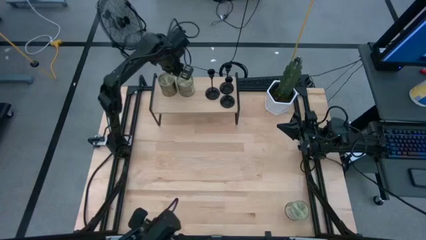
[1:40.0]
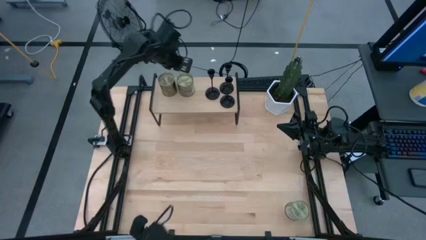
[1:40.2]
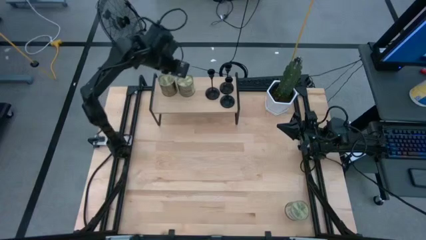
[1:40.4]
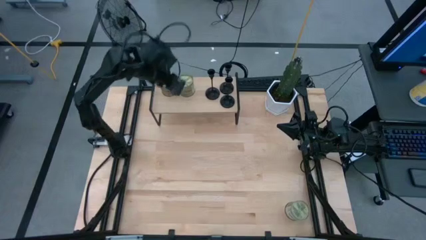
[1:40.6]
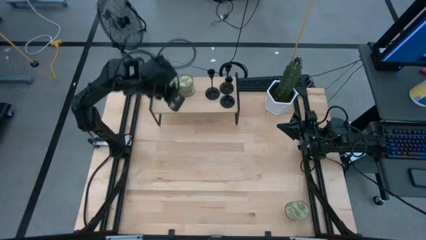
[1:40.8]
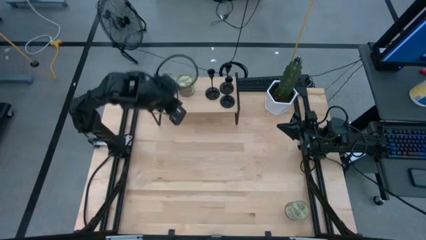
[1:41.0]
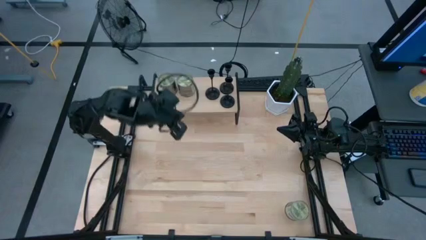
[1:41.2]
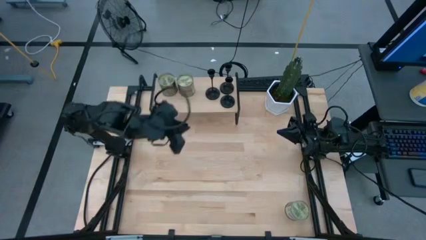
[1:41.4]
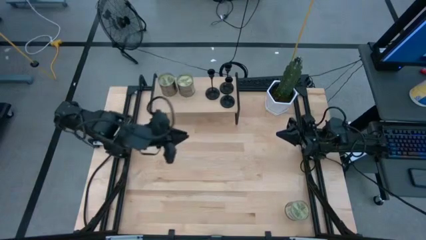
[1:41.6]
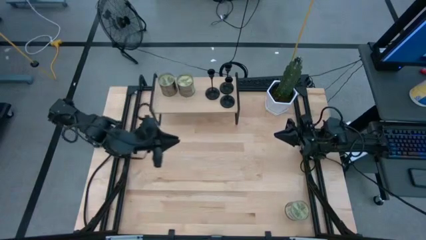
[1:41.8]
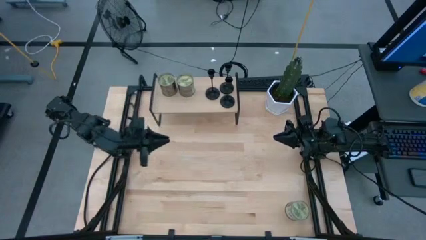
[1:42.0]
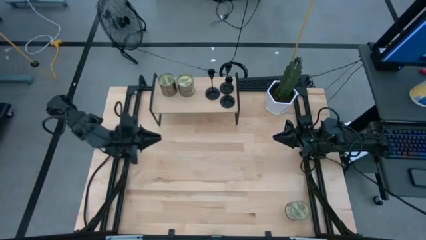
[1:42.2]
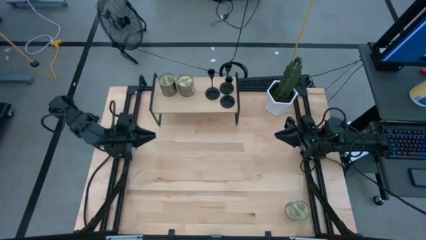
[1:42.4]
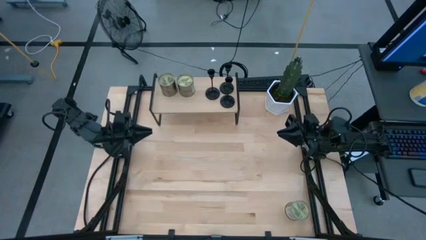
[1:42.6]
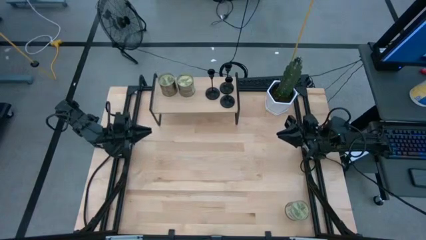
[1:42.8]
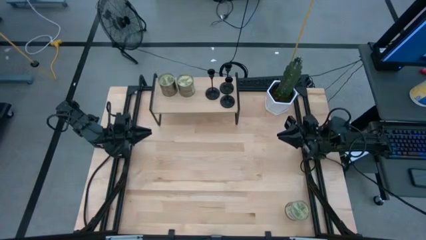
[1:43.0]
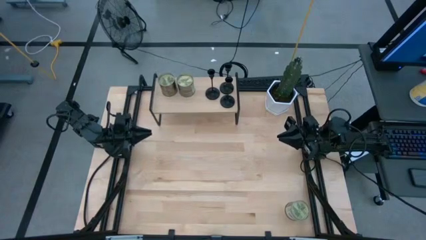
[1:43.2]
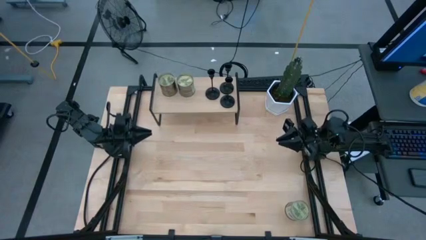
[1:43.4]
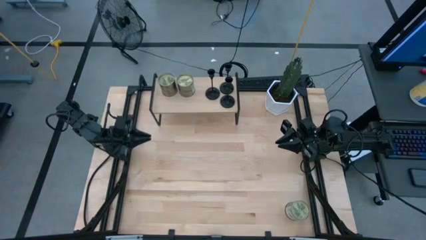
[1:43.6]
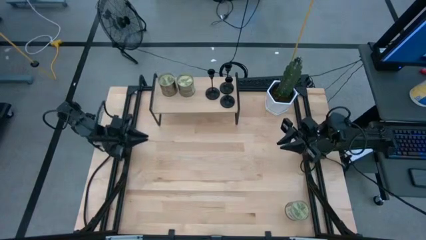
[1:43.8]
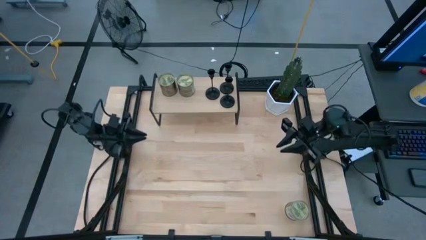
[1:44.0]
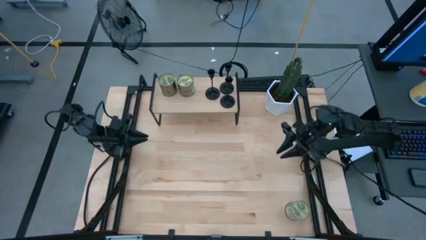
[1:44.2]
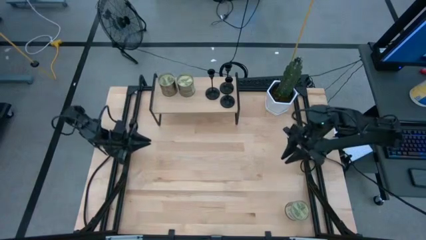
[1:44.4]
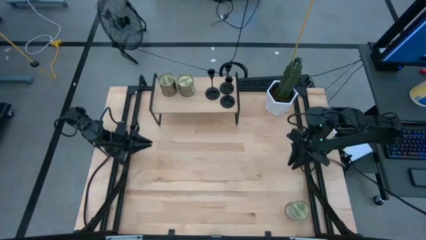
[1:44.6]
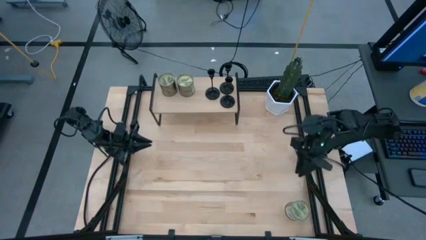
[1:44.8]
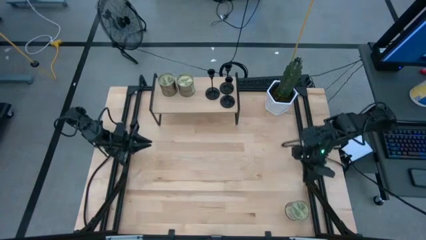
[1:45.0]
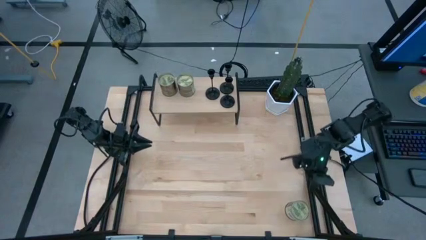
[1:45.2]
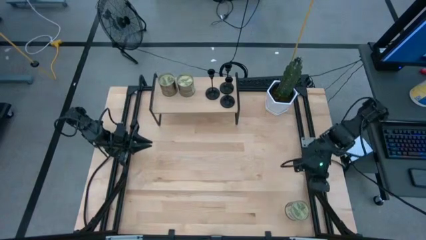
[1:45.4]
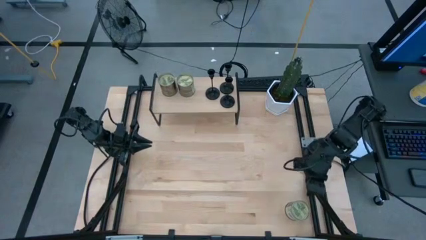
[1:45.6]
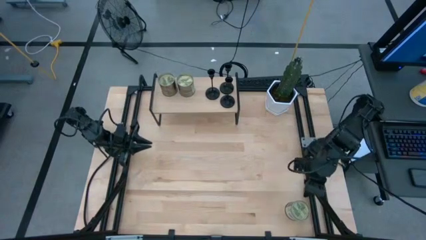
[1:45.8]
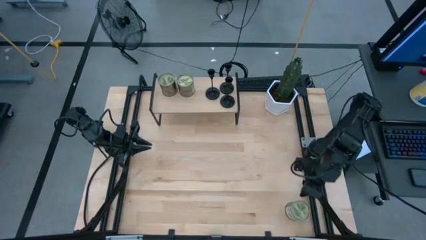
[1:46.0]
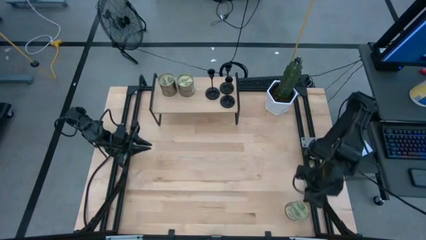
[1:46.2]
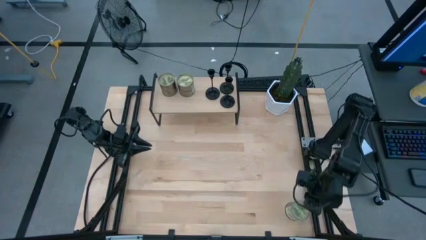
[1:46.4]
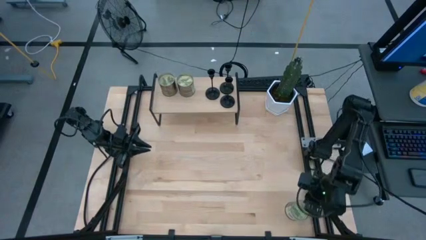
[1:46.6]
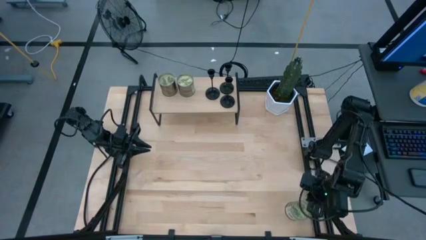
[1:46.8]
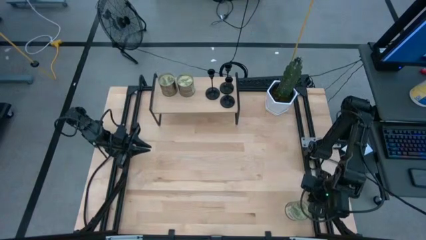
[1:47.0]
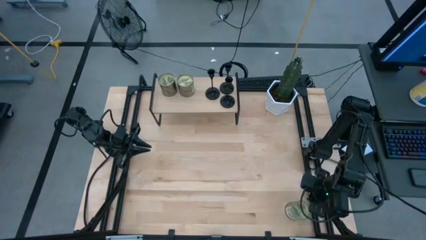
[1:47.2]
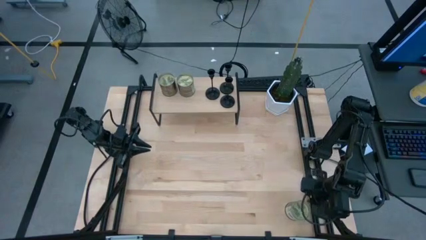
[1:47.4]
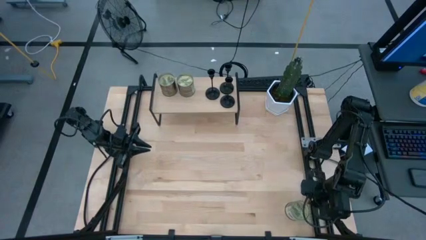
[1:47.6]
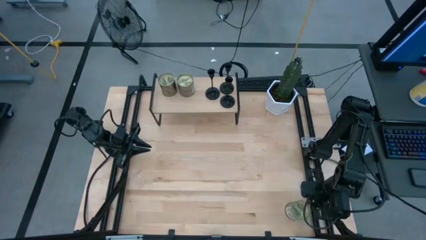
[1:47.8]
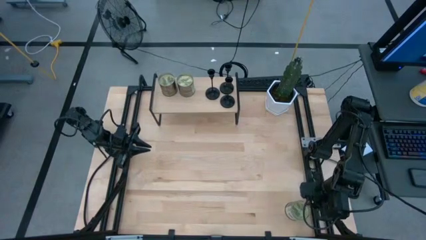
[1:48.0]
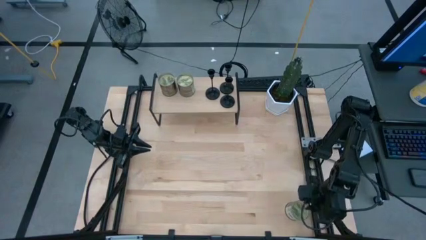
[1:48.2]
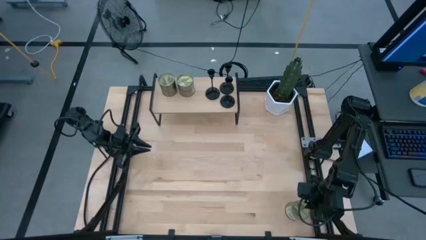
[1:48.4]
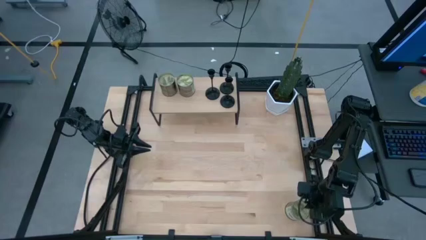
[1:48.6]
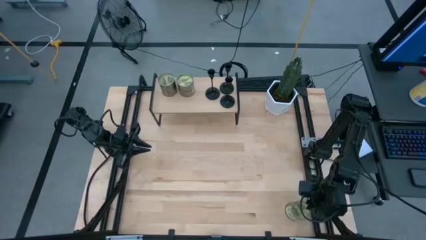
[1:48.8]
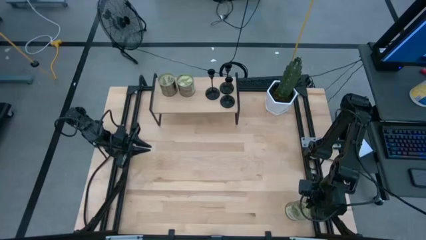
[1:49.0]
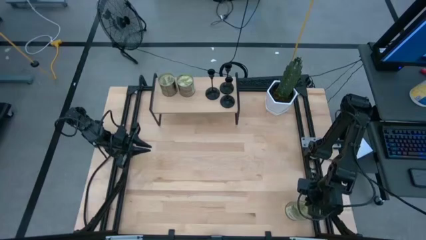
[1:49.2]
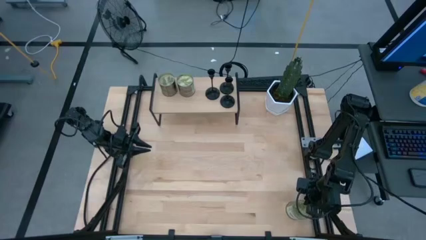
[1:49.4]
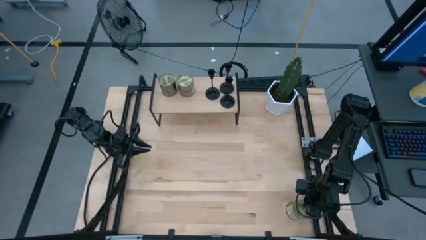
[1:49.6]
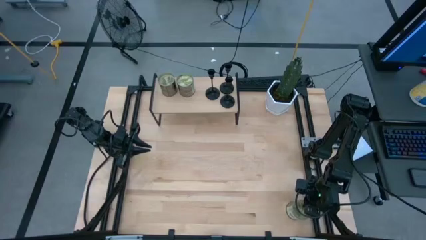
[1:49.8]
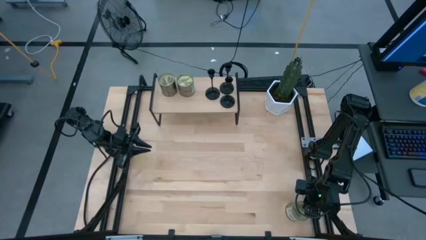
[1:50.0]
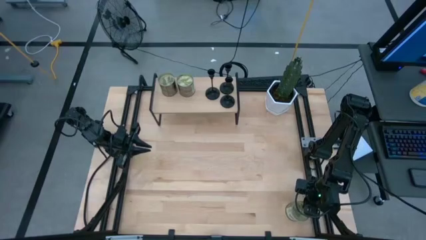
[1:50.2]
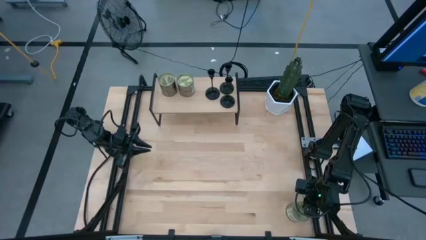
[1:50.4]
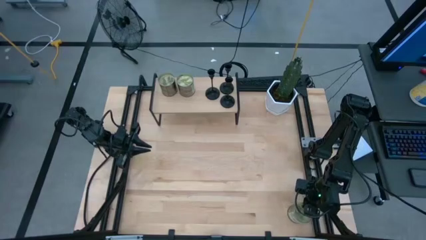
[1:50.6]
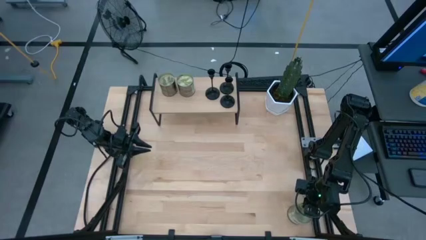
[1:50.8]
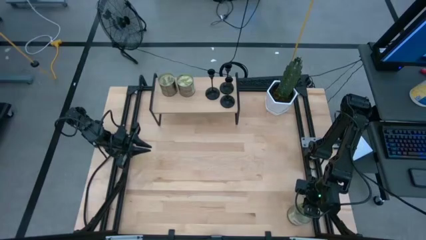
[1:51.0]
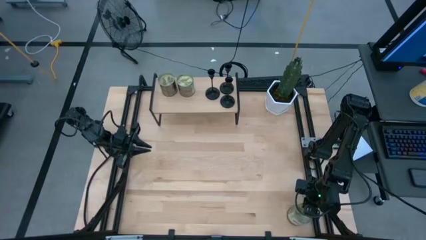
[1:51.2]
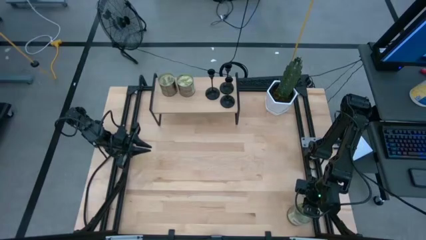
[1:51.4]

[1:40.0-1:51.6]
Task: Pick & Place candle stick holders
Put the silver scented candle on the shelf

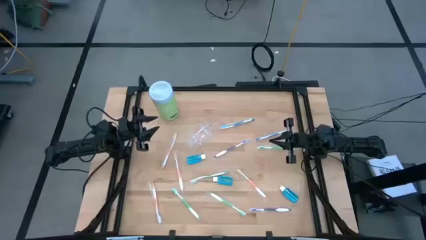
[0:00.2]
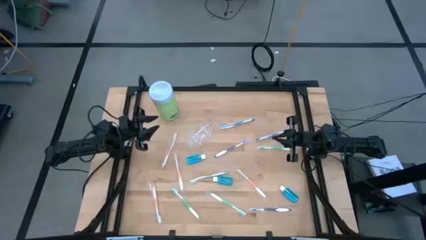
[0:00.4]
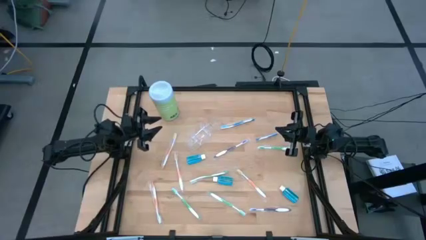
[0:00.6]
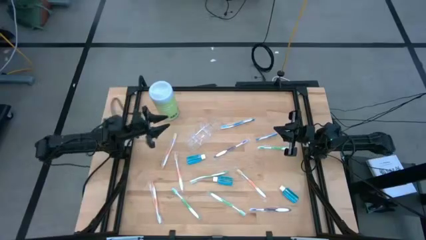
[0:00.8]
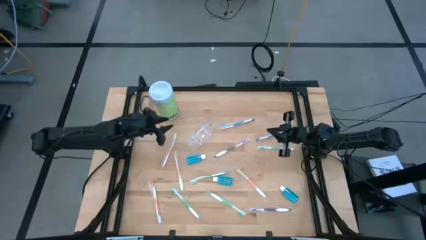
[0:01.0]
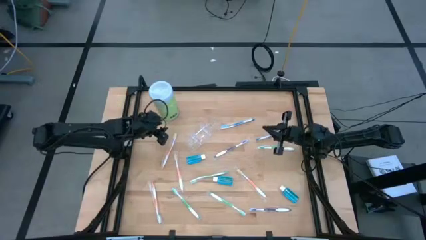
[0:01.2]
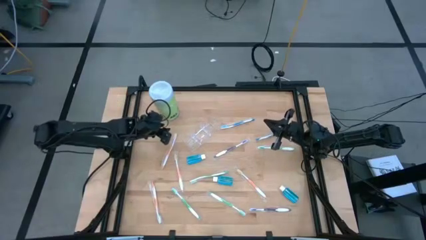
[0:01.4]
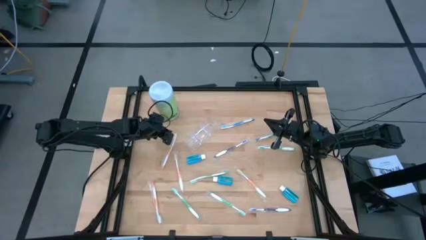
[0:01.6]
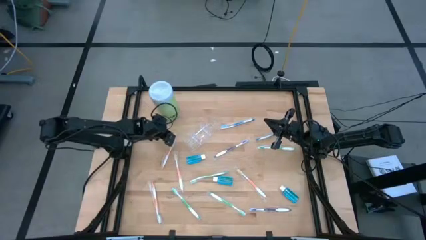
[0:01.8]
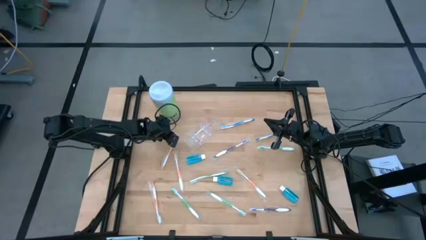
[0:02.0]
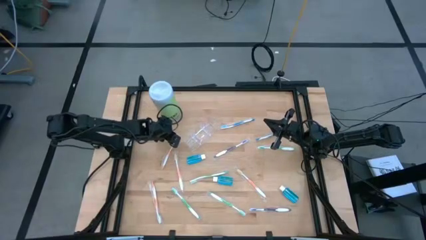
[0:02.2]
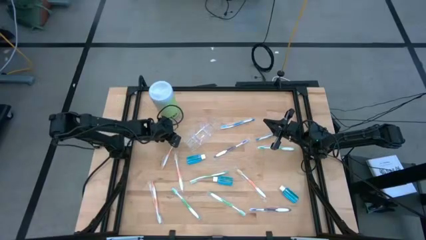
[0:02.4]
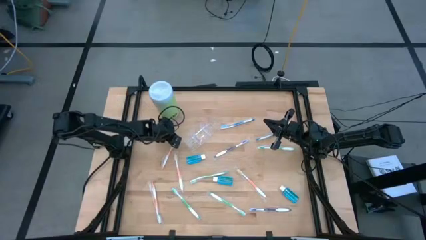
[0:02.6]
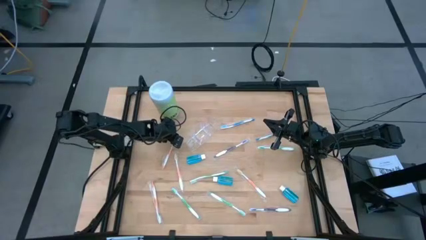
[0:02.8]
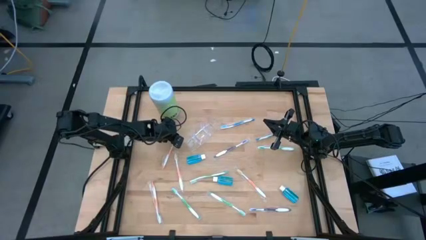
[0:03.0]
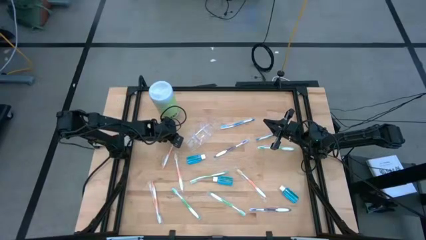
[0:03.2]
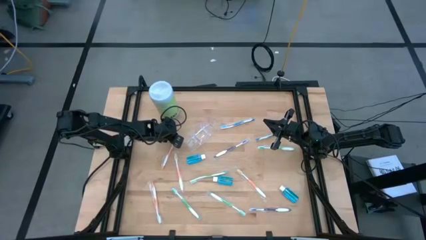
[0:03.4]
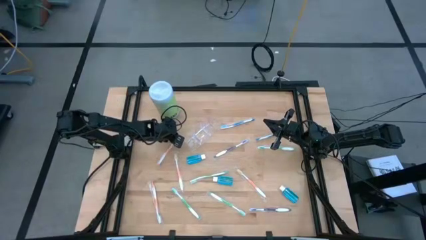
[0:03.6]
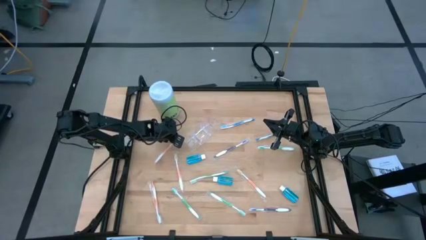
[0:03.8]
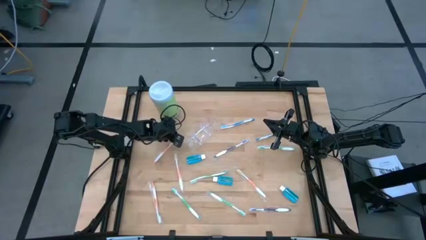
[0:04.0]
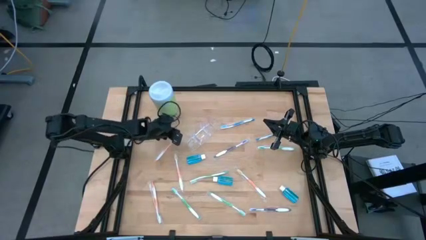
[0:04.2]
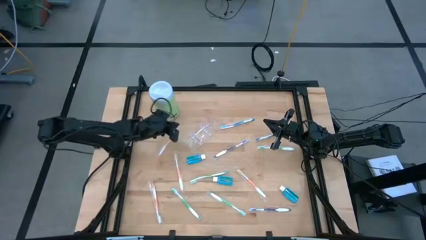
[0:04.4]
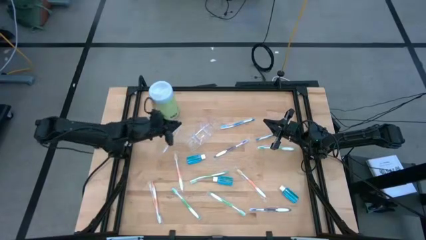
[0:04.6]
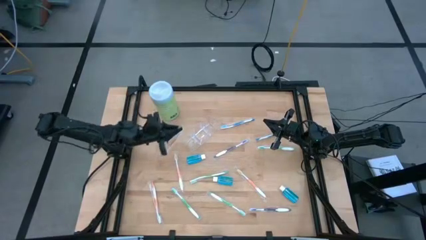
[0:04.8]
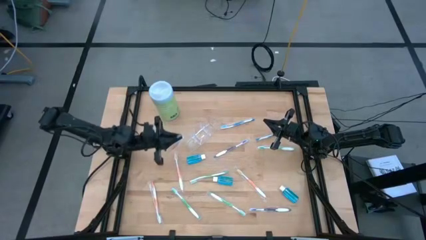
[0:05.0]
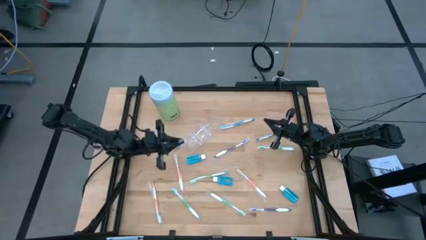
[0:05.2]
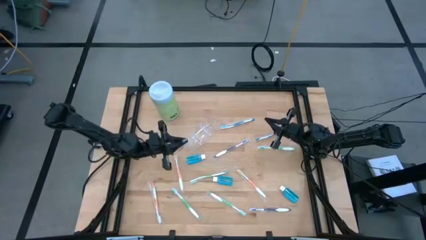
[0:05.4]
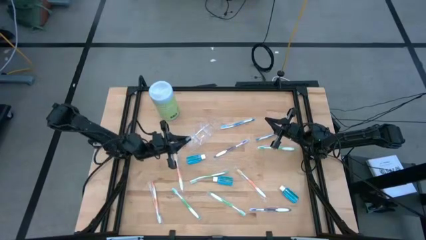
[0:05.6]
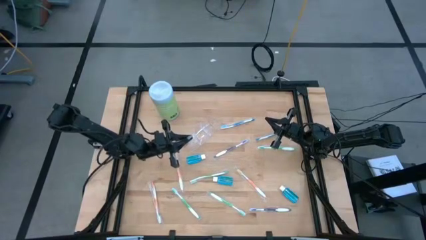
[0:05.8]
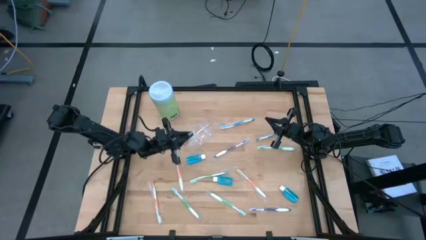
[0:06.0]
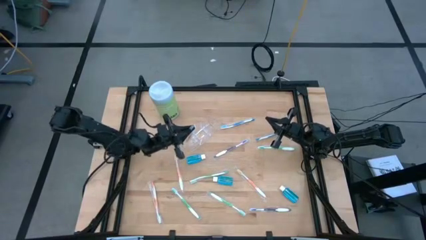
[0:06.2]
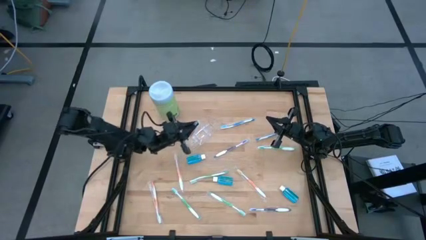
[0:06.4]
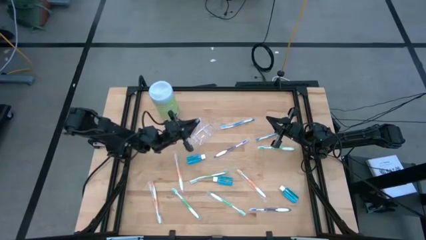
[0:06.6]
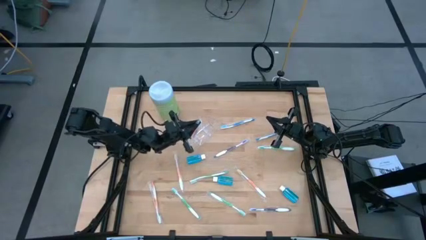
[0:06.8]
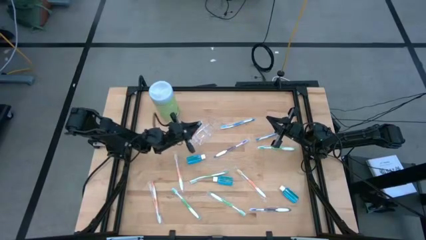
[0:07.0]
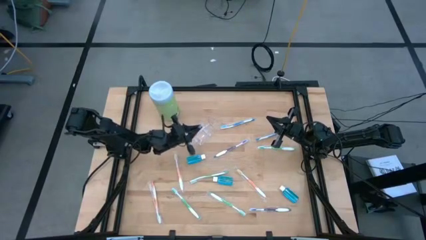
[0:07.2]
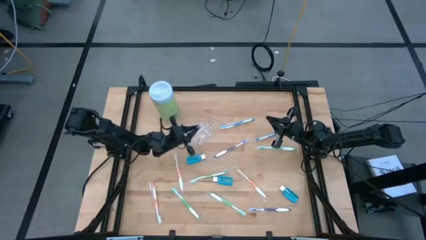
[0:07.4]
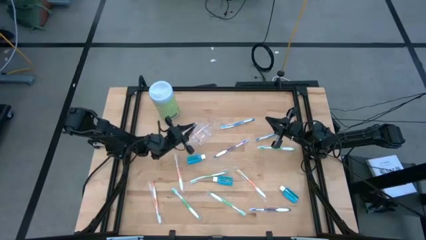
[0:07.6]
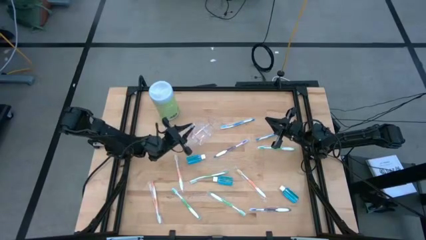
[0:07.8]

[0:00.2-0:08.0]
Task: Pick & Place toothbrushing station
Put the orange toothbrush into the transparent organizer
